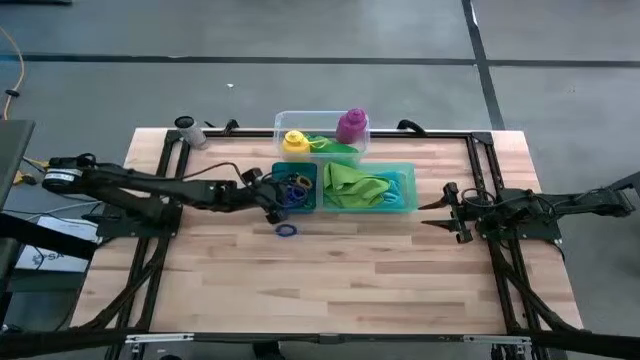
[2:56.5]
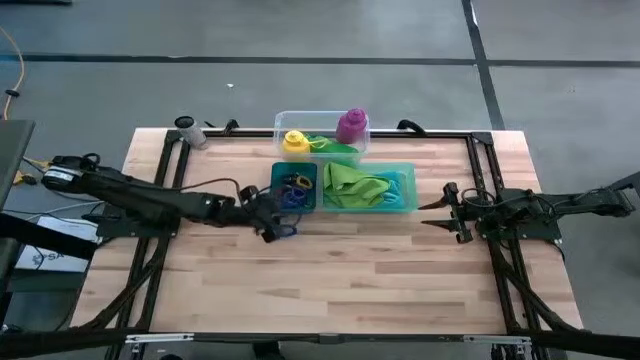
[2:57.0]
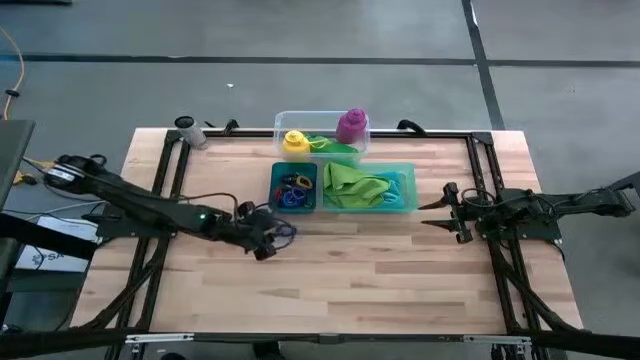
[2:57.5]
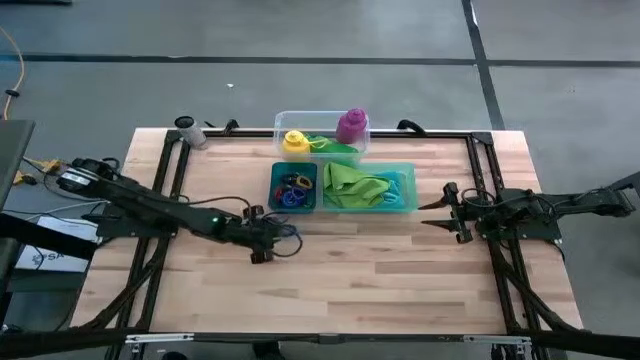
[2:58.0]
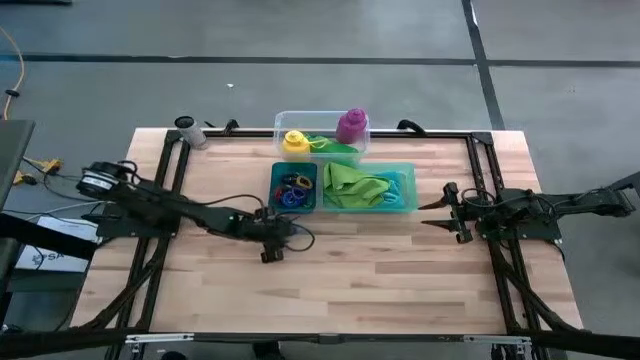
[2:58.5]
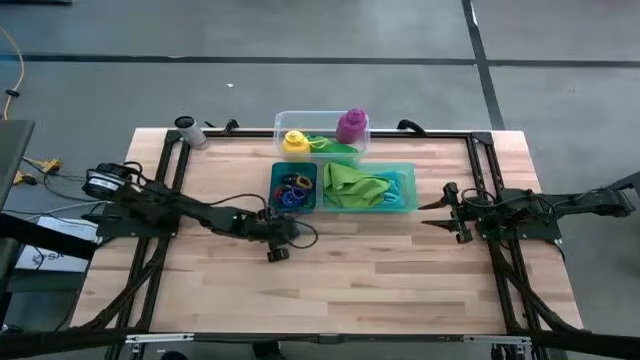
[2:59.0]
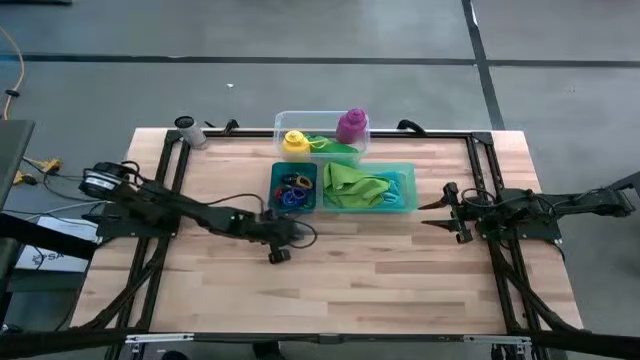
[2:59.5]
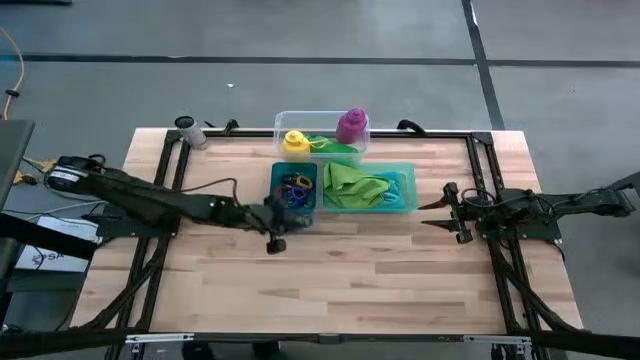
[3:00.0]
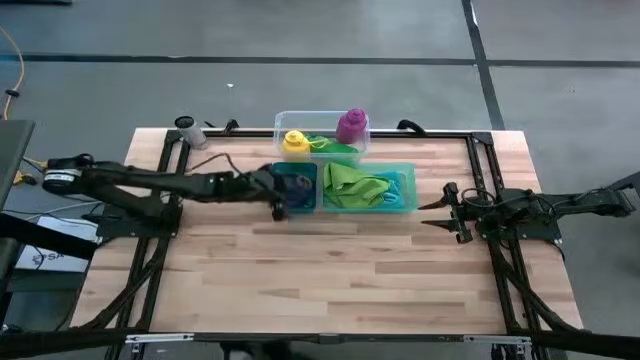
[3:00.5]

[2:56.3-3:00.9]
Task: Pick & Place Sports Items
Put the blue spring keychain into the blue bin

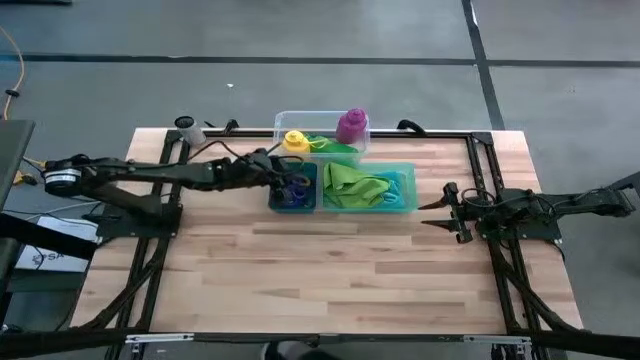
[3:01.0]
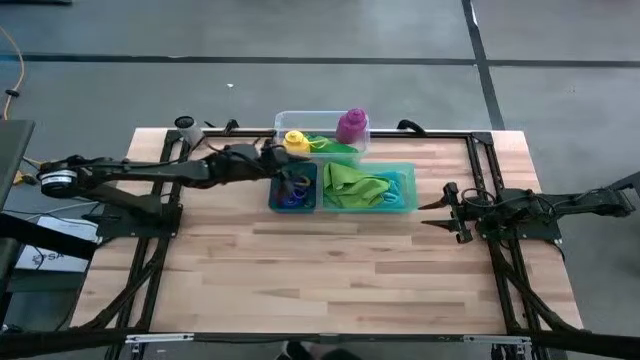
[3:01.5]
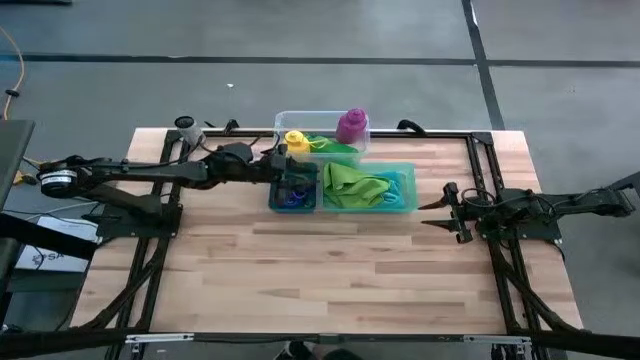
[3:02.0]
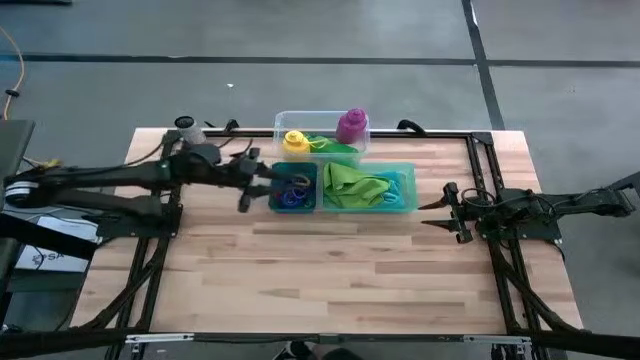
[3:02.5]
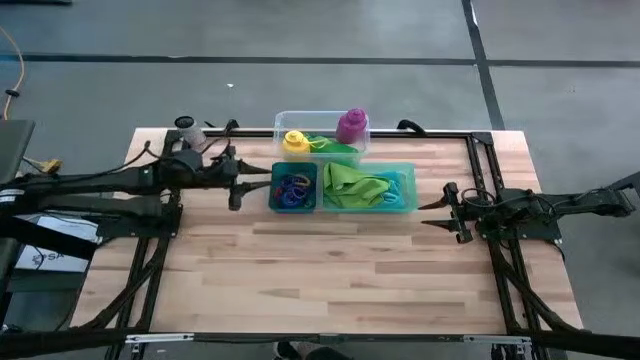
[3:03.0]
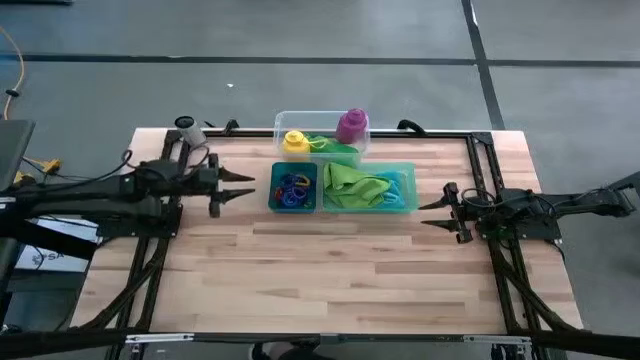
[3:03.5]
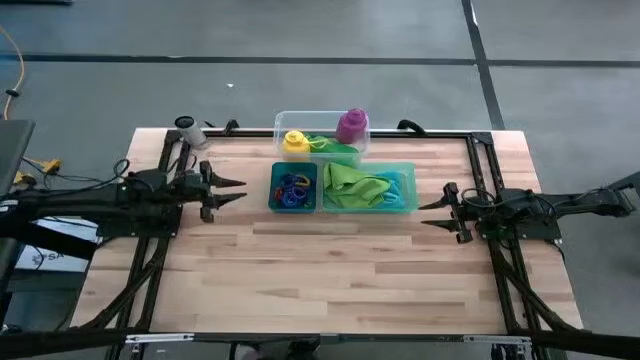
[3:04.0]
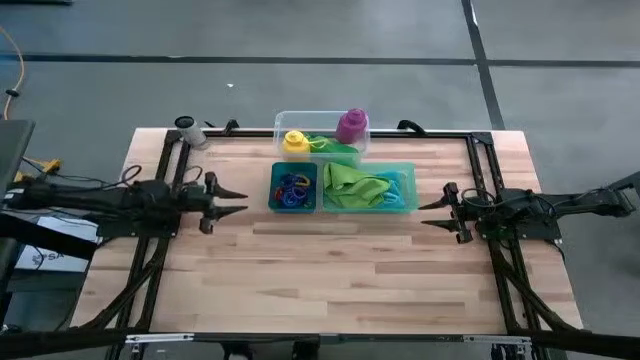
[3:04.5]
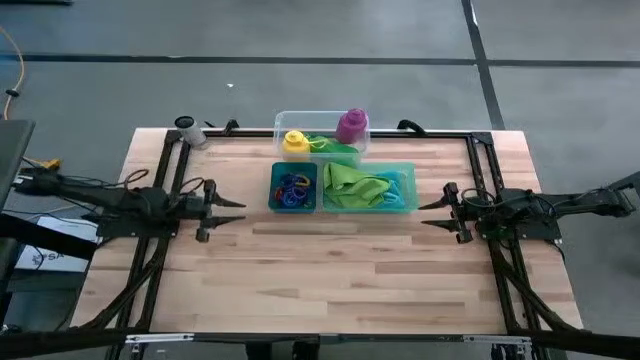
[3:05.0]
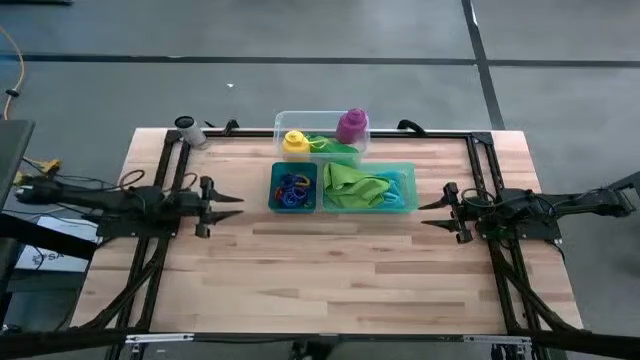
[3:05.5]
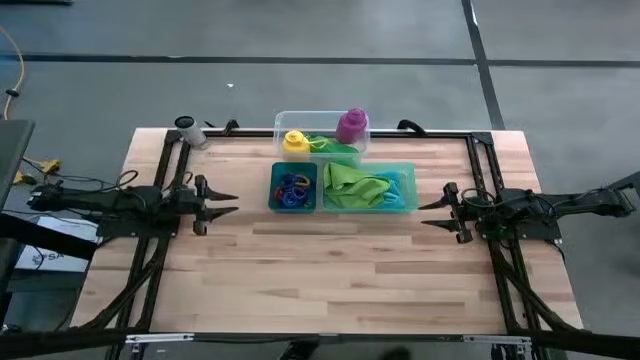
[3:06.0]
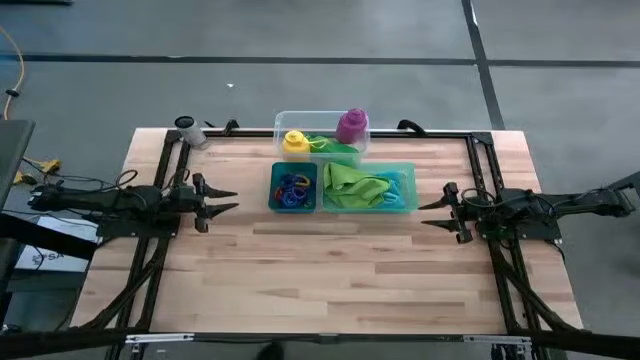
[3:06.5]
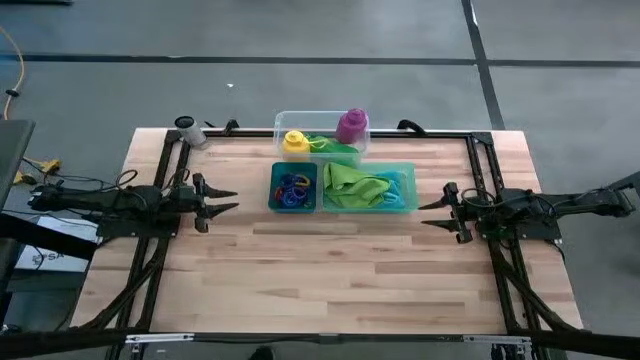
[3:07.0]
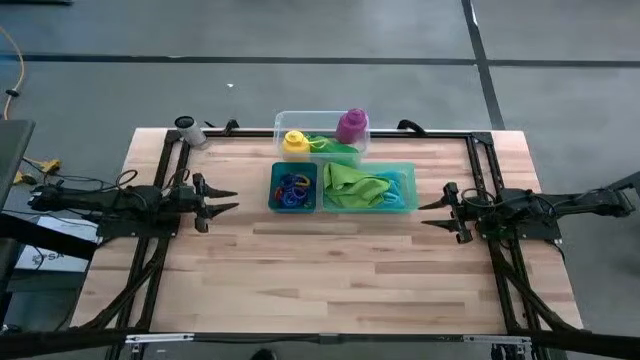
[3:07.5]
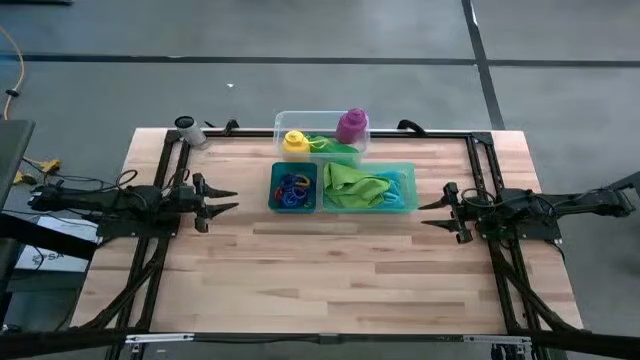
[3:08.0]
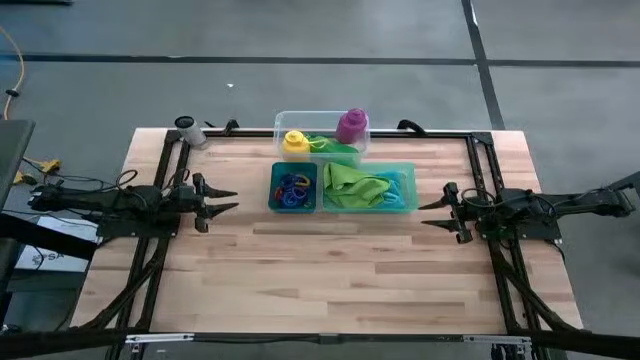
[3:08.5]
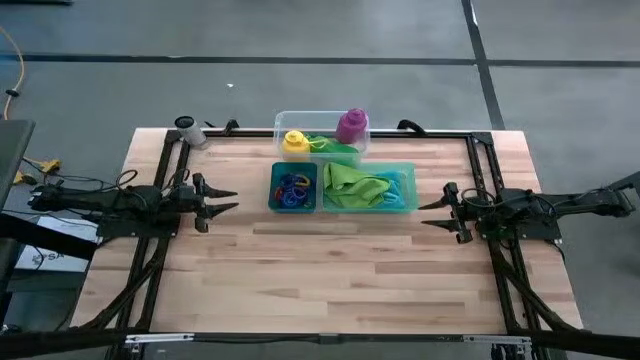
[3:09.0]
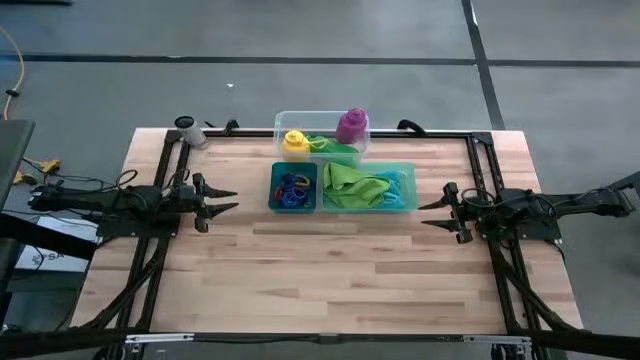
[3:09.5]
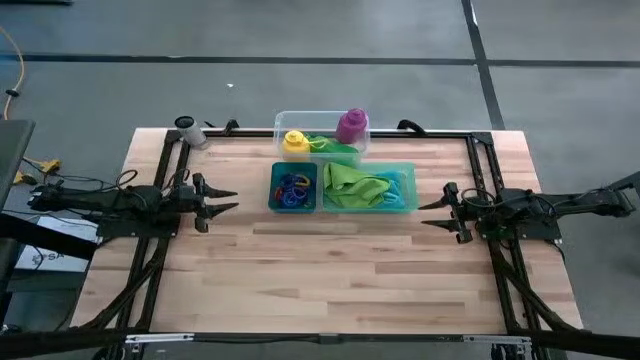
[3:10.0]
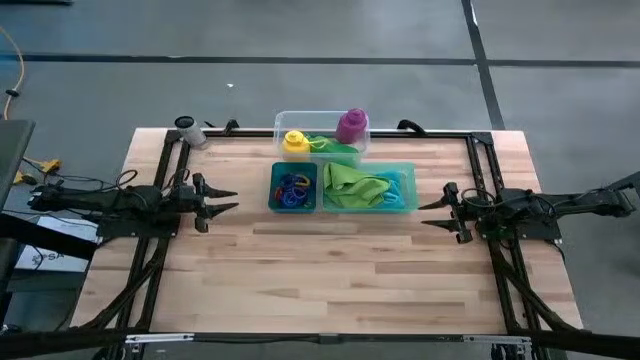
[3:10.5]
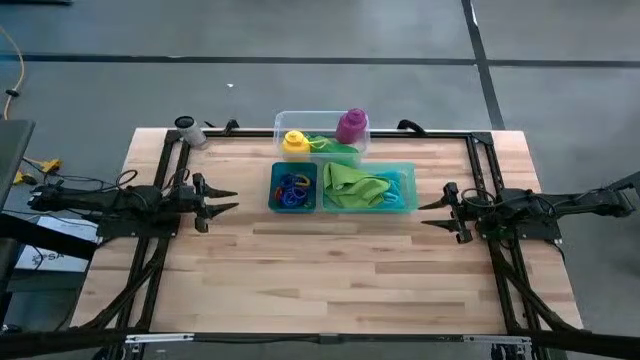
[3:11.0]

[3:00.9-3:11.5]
Return to Home Position

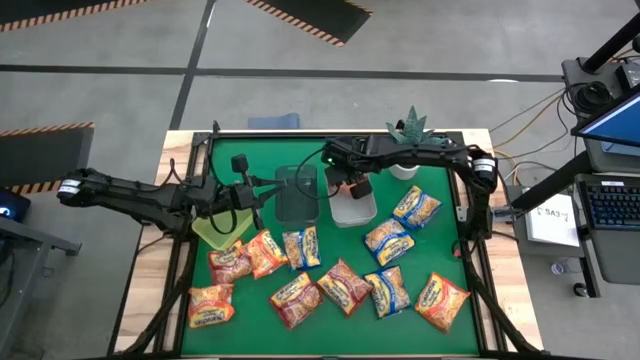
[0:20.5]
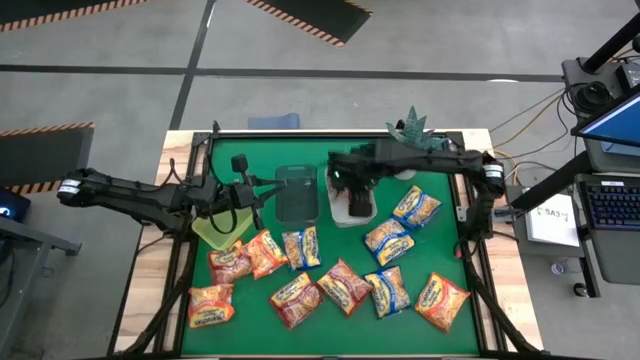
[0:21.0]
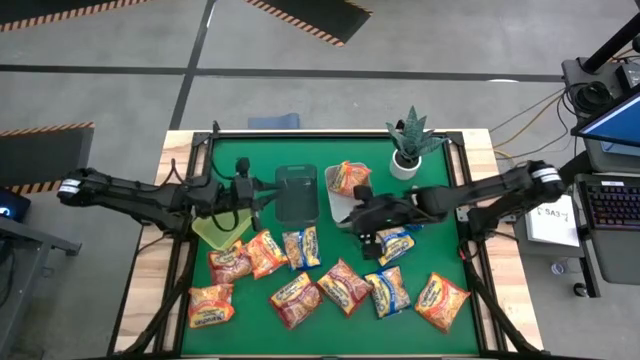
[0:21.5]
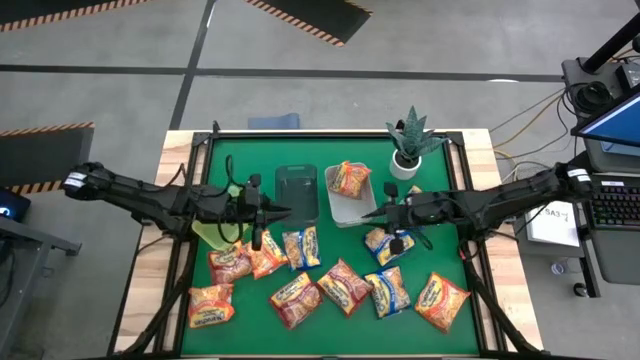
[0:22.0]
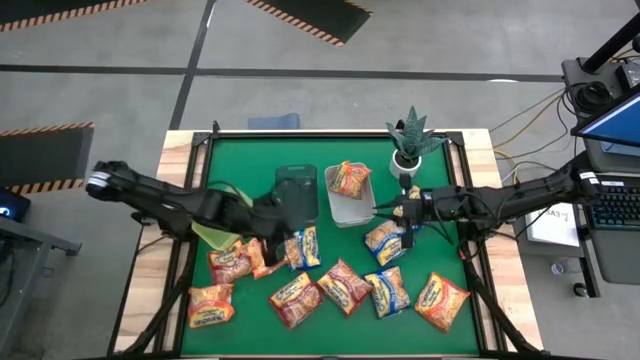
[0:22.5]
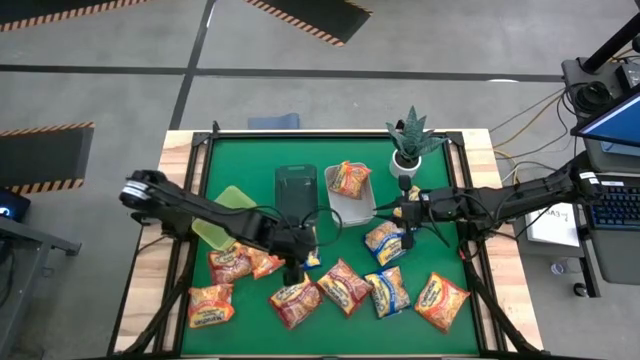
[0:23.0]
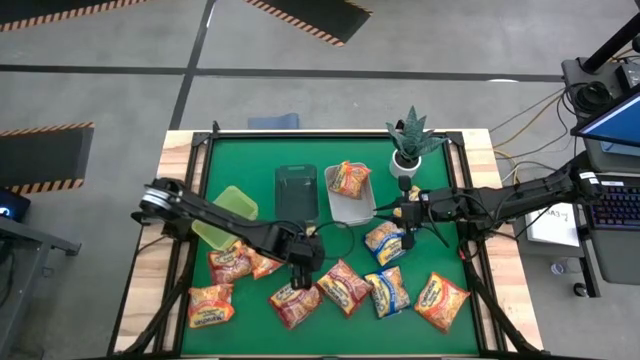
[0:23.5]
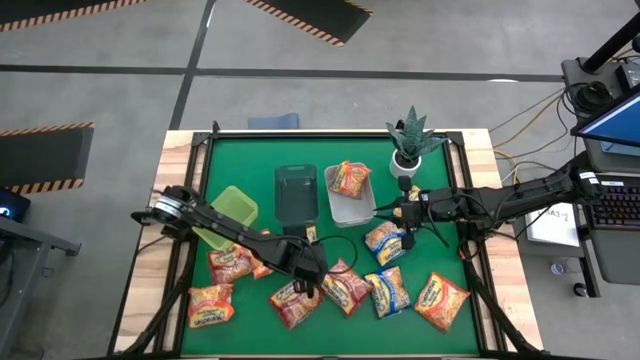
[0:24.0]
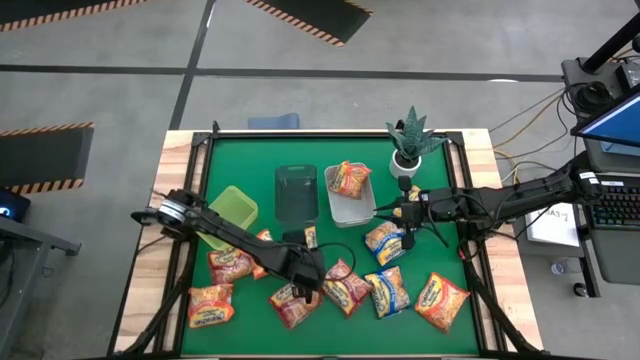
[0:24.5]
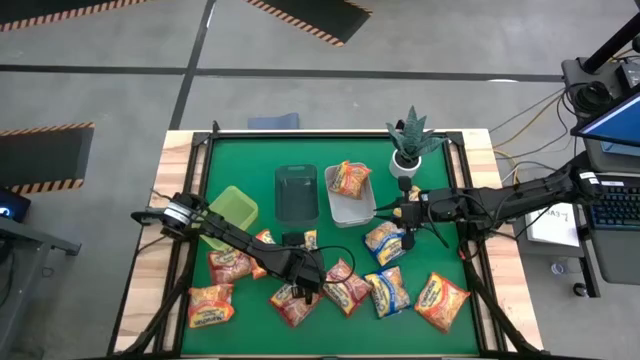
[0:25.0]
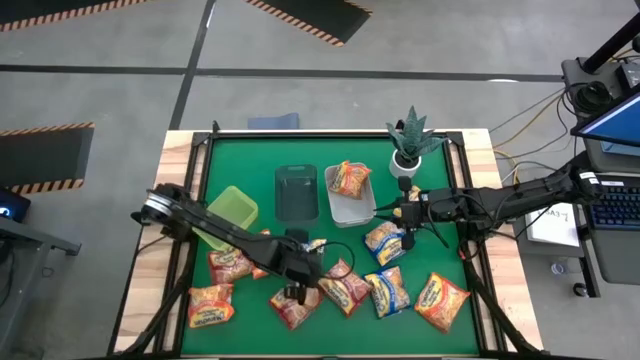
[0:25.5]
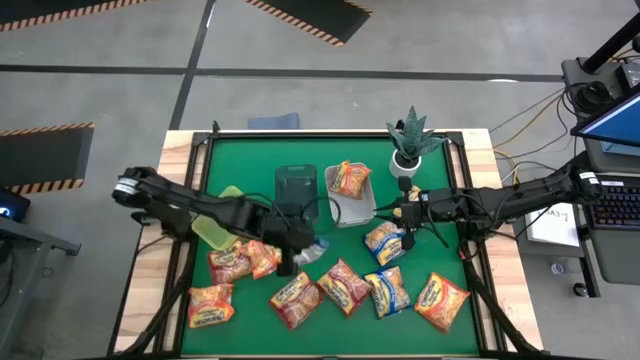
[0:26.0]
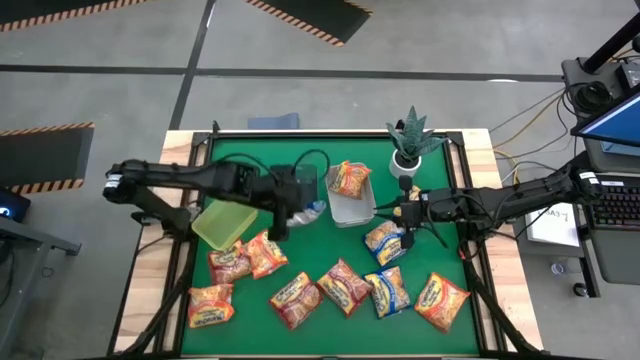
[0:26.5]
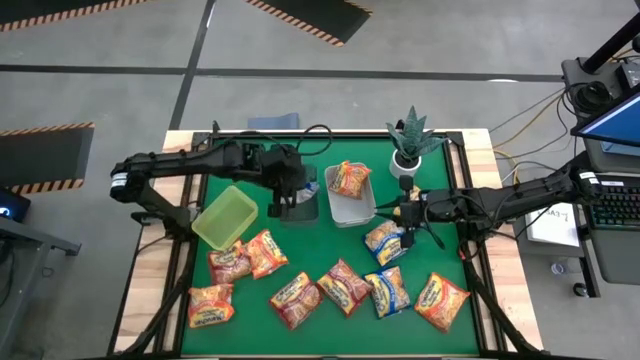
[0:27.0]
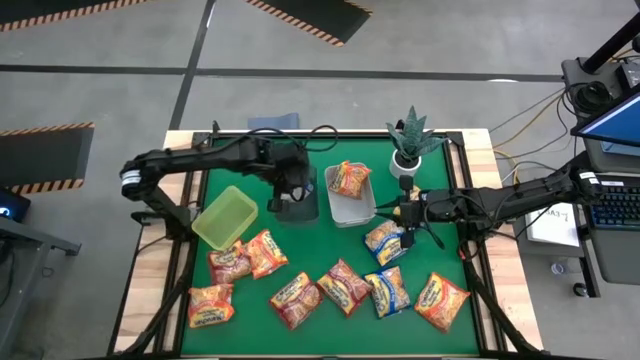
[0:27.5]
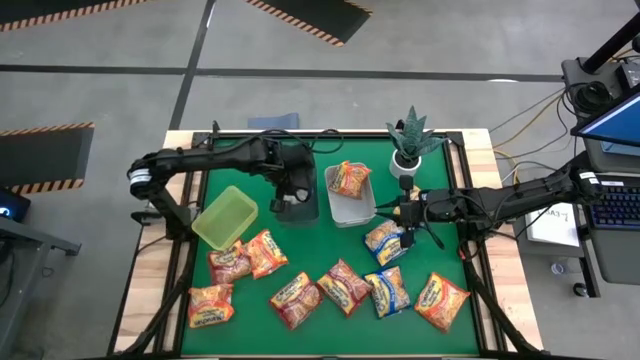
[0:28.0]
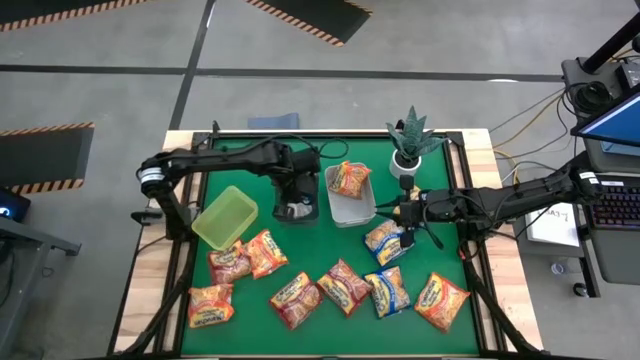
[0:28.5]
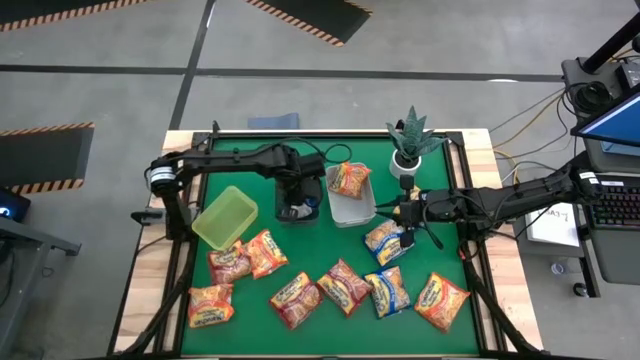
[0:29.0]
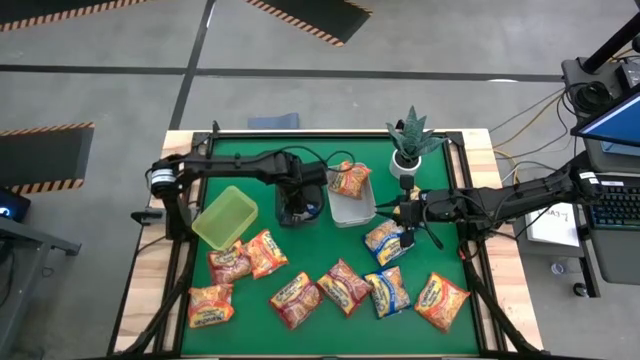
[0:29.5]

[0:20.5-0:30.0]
Task: Sort Maruchan noodles
Put the blue noodle pack into the black bin
